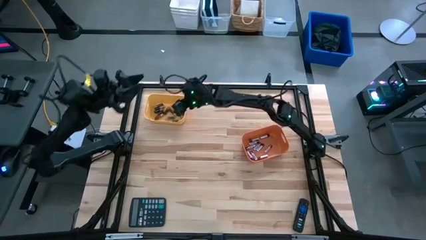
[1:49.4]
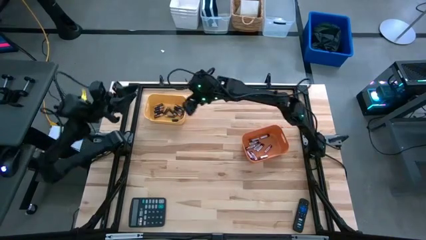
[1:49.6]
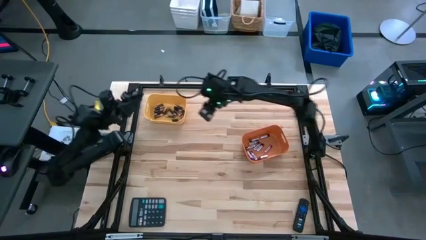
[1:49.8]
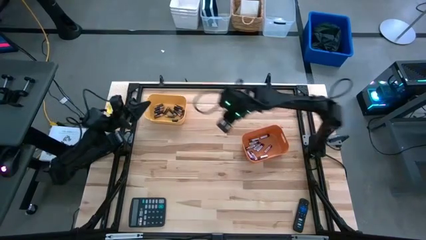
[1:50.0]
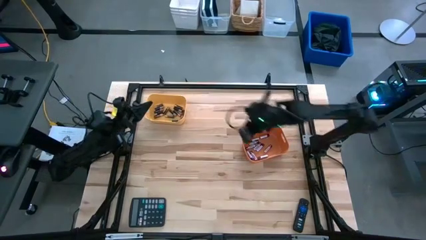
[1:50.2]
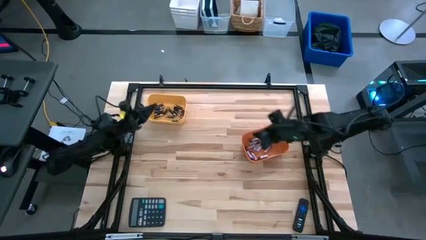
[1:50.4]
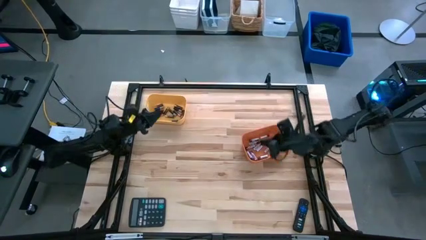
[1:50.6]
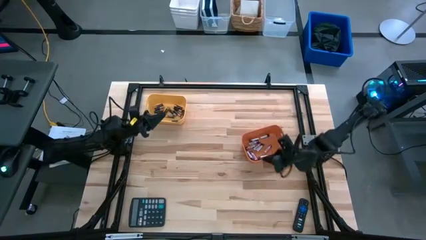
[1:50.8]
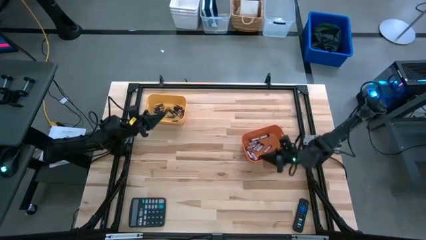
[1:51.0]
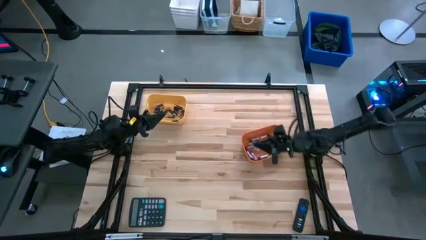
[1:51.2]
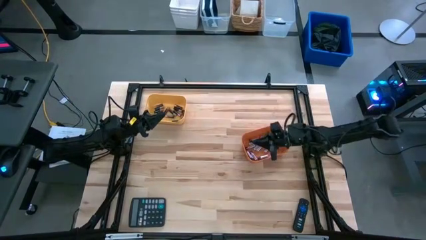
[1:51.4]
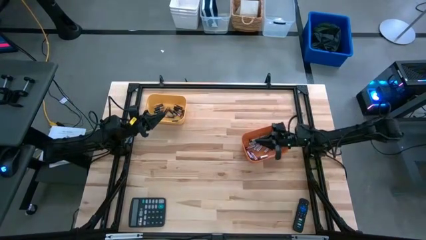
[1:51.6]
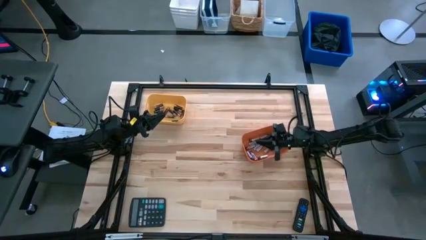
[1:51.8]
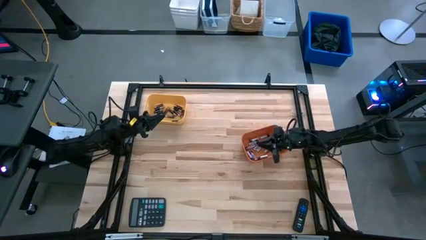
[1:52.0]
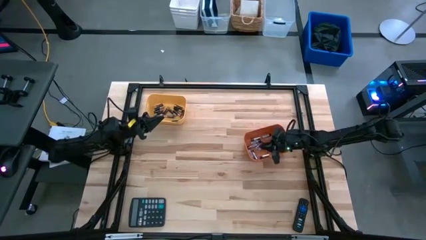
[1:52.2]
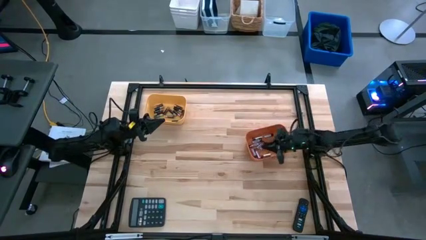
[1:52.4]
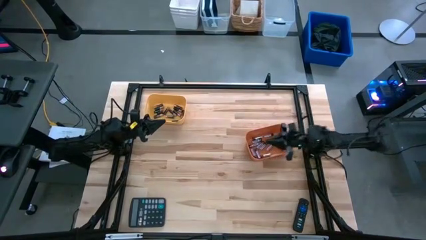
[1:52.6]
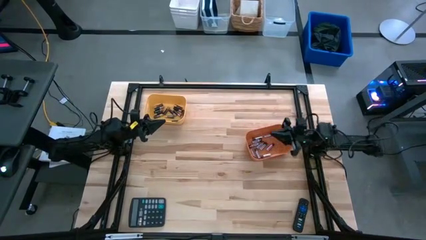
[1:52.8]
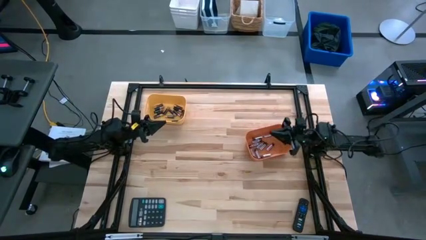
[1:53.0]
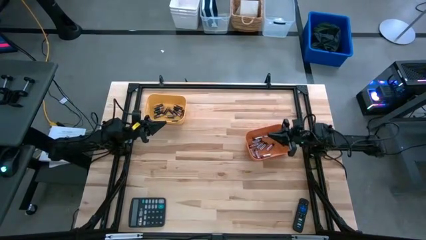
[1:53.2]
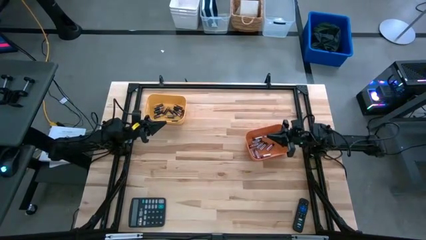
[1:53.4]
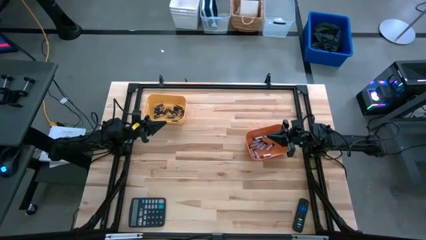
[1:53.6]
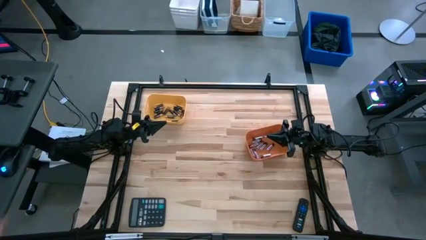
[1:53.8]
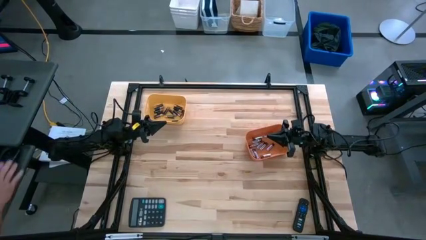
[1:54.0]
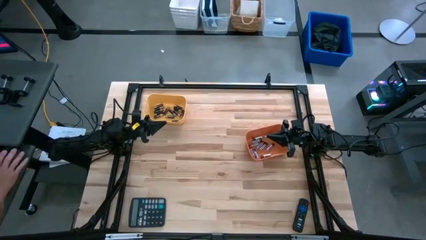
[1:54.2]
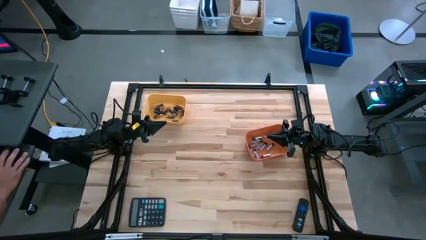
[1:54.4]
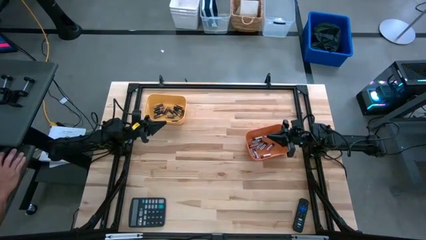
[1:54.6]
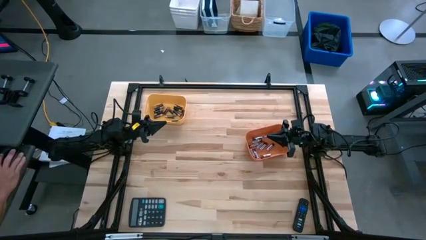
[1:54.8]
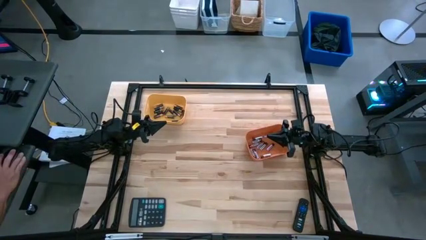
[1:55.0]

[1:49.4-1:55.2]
Task: Sort batteries
Return to Home Position

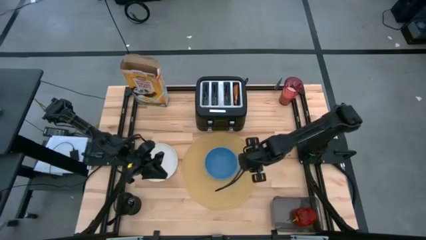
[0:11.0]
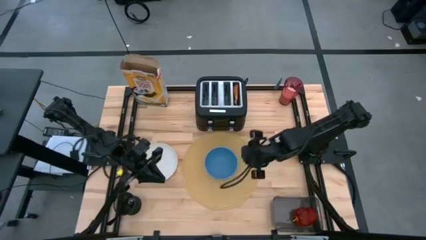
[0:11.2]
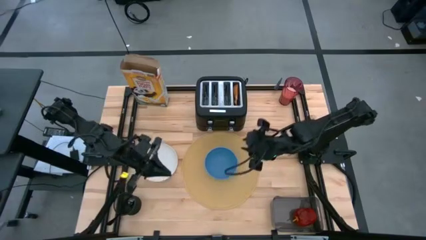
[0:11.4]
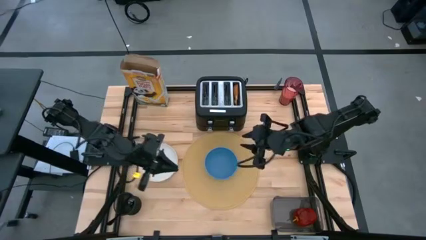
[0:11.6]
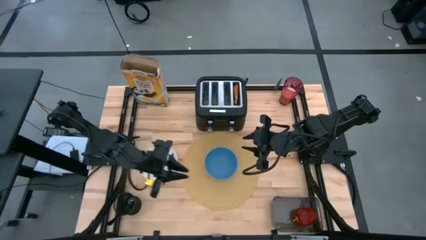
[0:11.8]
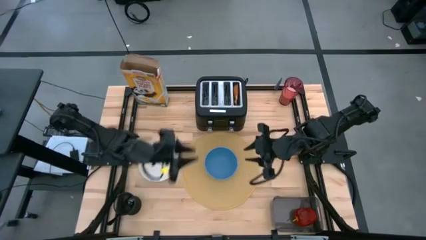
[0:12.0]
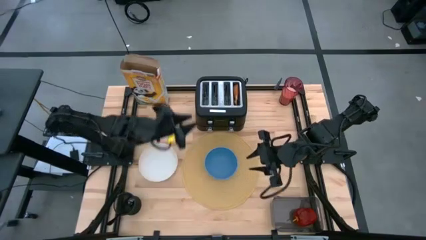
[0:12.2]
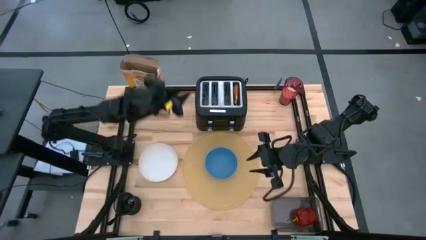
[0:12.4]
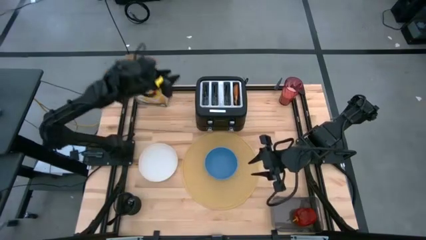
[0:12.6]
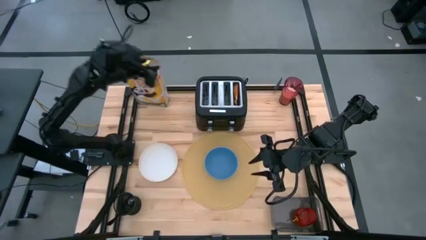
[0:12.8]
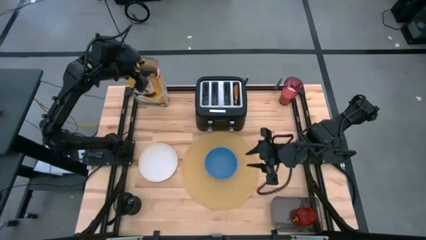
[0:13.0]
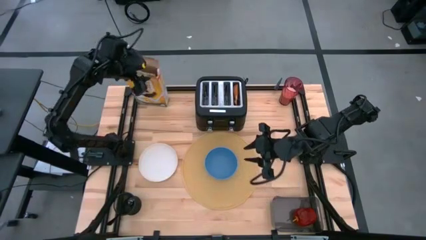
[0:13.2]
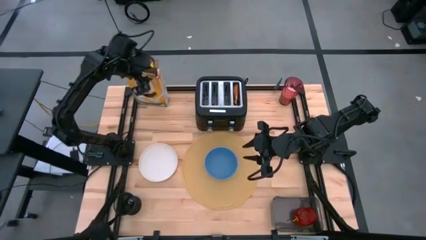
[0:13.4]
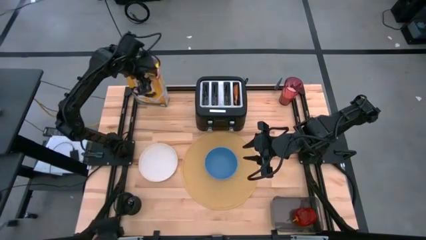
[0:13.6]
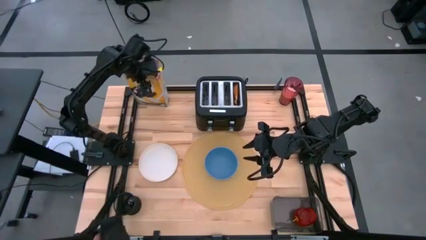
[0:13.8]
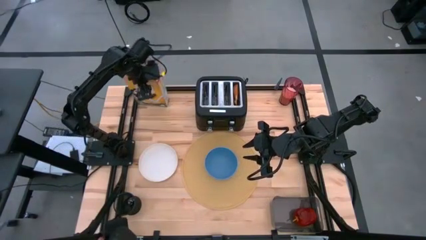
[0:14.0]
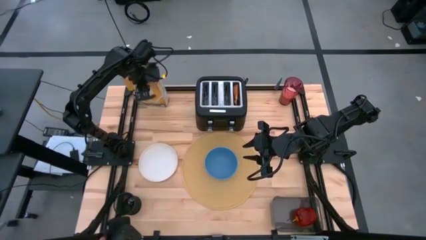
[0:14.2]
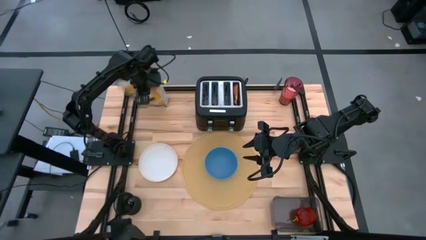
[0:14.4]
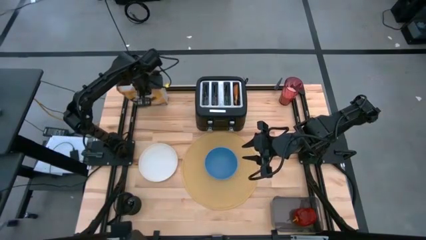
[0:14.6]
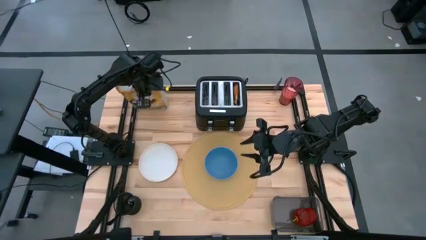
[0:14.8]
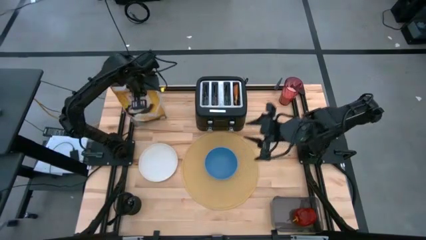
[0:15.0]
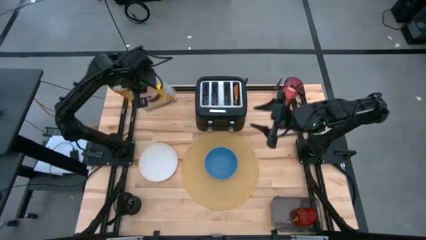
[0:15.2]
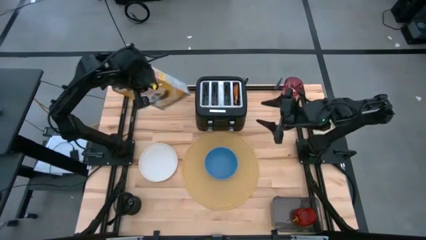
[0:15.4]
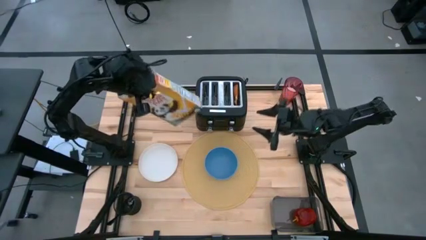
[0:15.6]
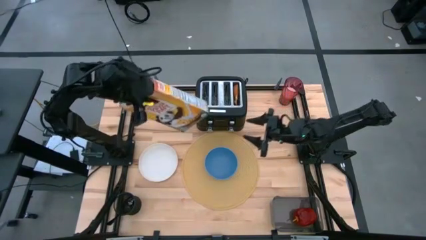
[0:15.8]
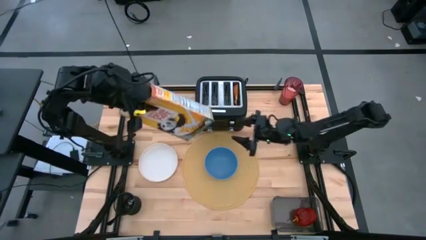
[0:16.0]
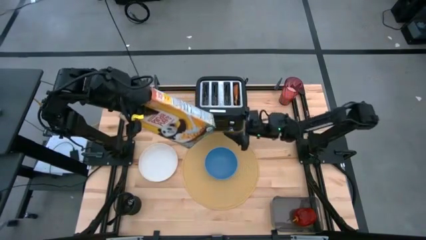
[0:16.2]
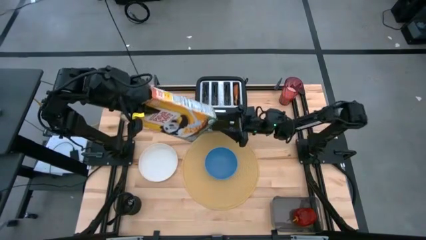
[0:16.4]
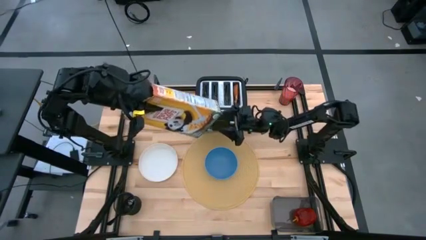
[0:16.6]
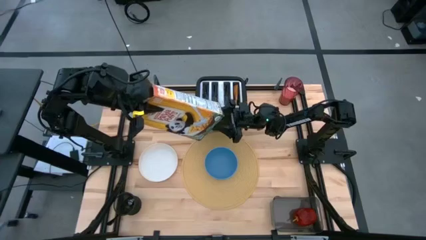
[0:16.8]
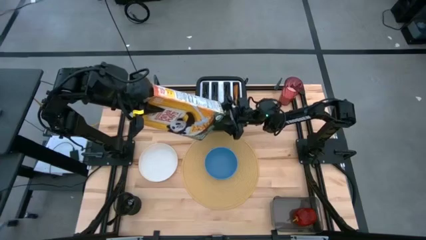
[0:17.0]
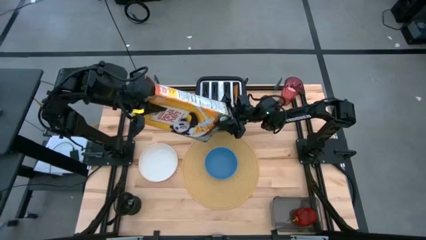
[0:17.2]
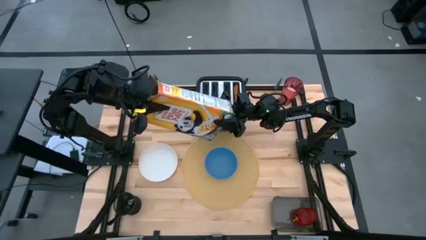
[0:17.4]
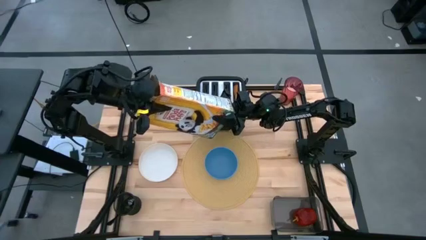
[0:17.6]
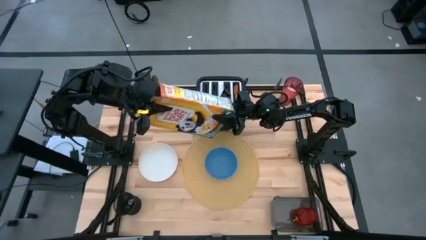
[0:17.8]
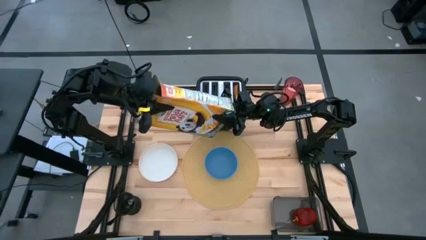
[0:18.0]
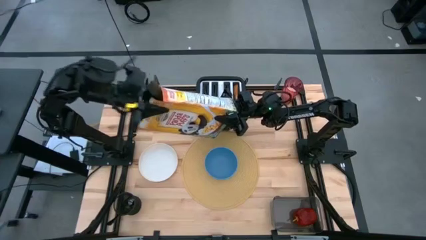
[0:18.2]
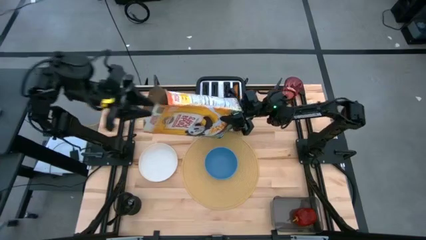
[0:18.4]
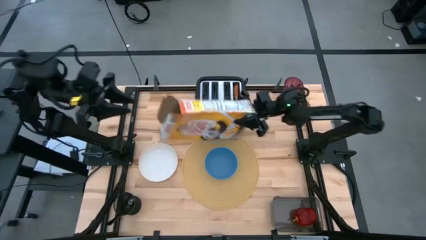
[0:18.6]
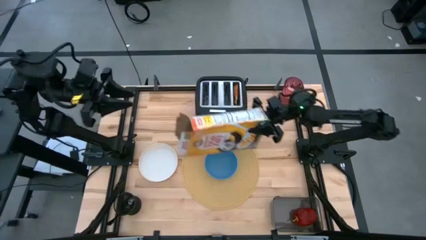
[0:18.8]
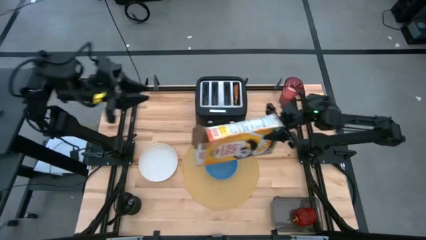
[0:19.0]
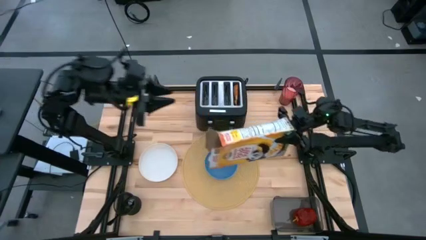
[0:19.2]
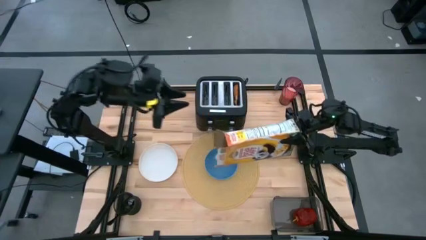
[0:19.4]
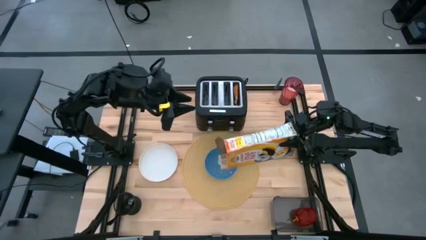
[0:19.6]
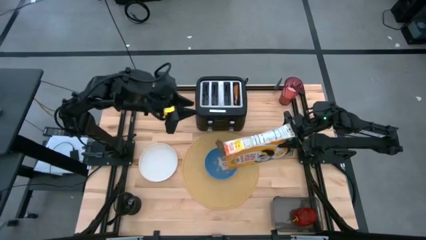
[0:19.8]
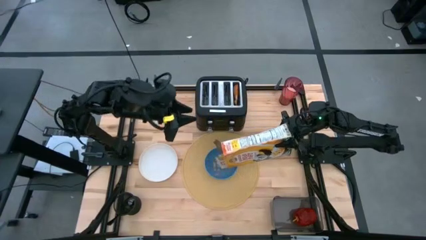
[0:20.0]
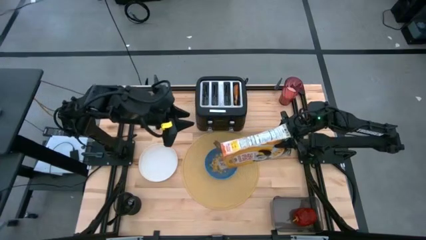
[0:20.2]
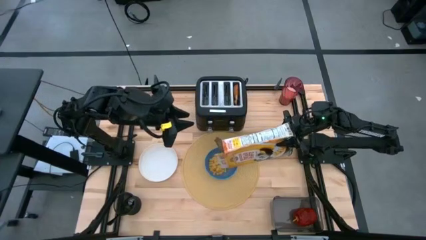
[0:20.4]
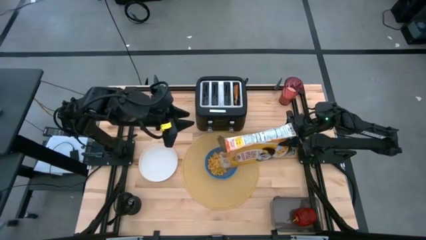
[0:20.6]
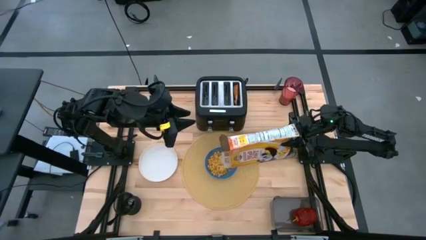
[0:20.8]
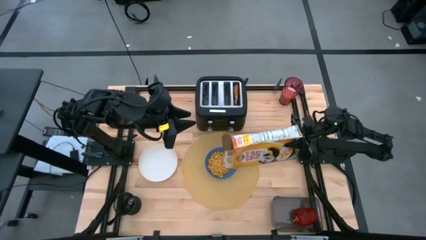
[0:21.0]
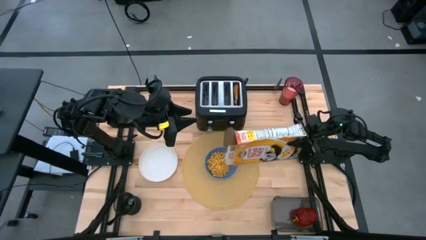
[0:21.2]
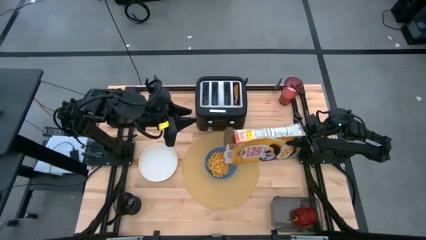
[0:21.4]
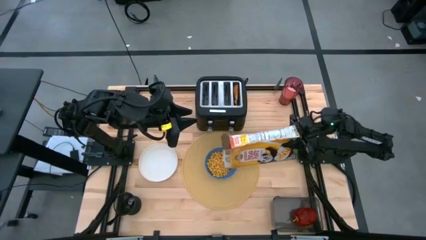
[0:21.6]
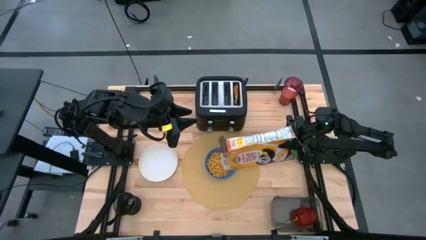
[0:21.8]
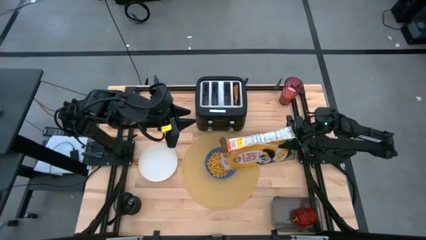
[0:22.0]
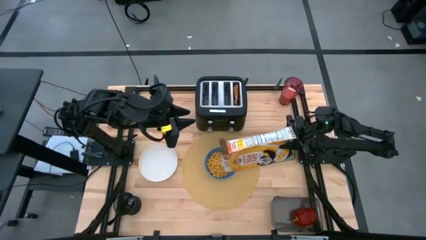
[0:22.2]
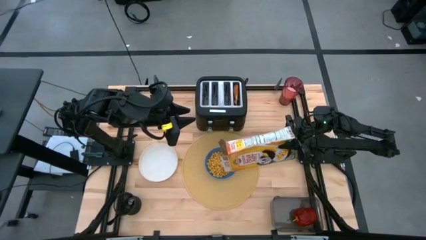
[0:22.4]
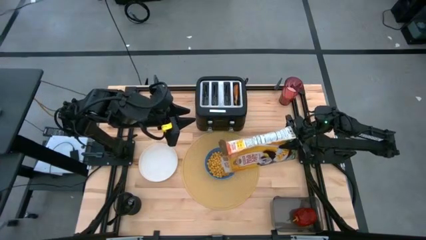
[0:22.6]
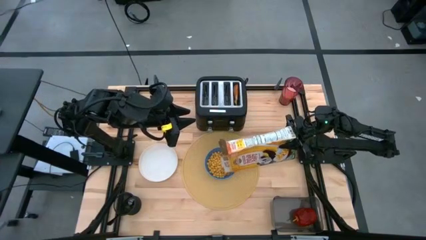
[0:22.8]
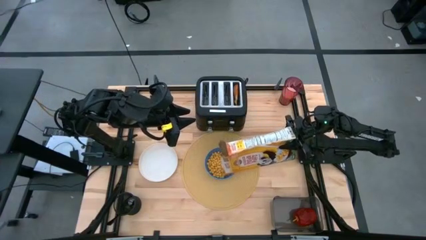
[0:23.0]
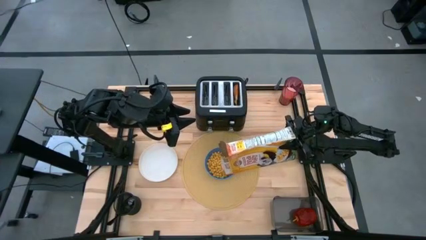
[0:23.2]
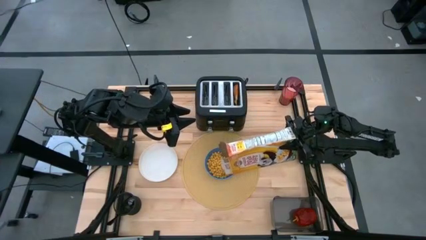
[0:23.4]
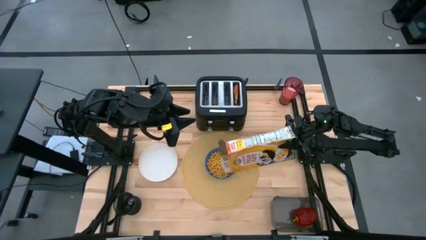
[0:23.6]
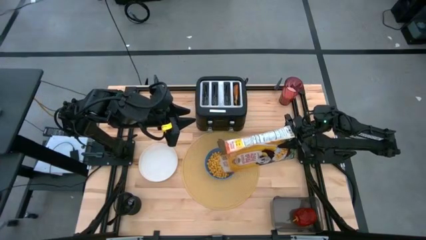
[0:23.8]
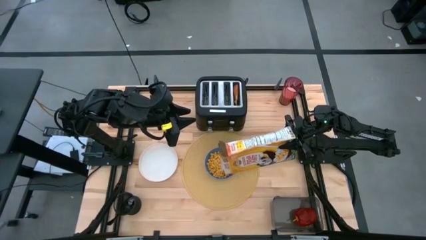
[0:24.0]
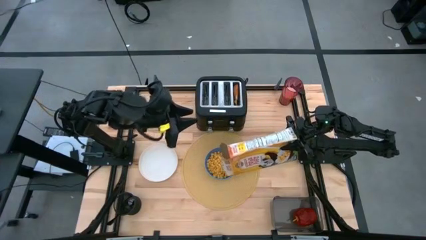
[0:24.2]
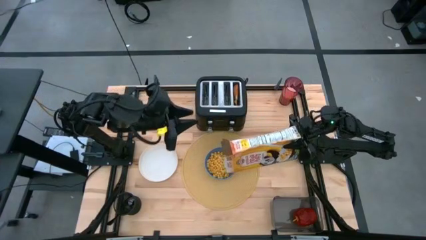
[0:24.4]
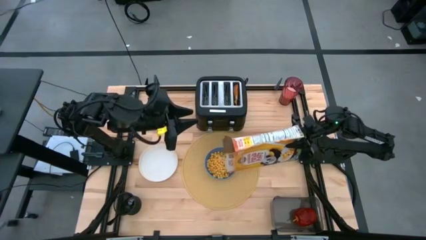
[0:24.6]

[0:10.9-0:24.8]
Task: Arrange a breakfast setting
Pour the cereal from the cereal box into the bowl
